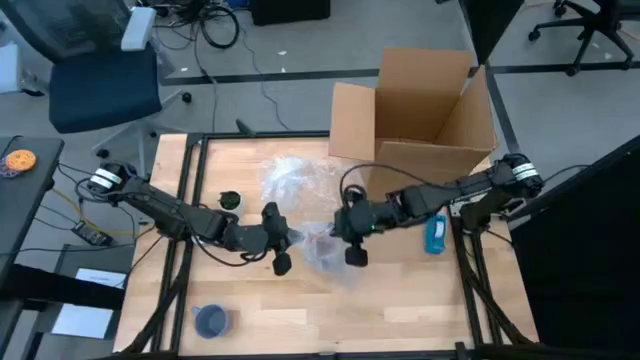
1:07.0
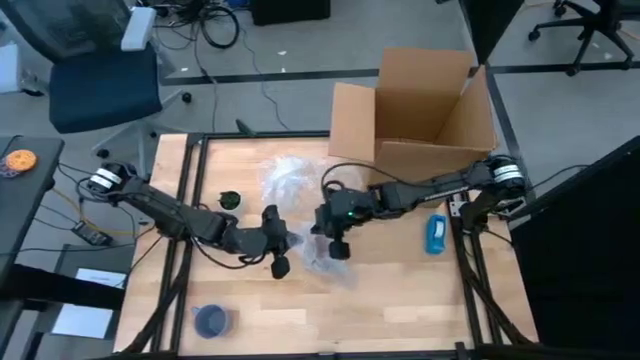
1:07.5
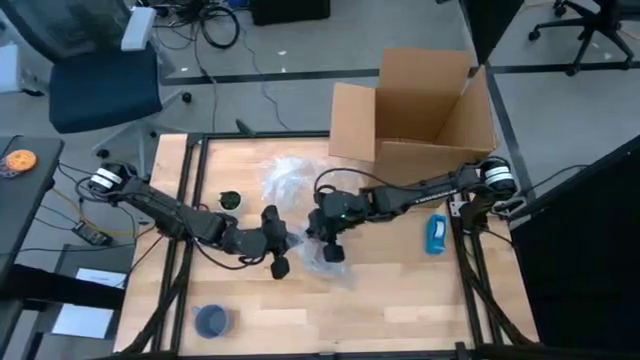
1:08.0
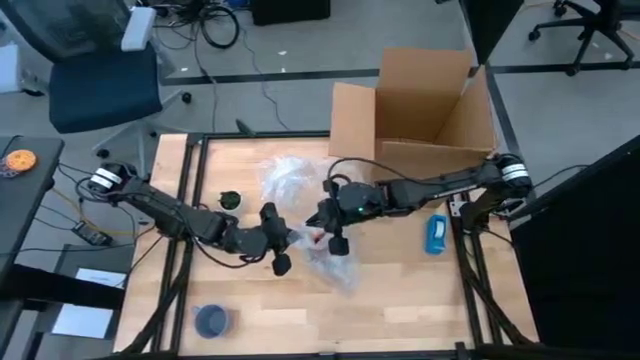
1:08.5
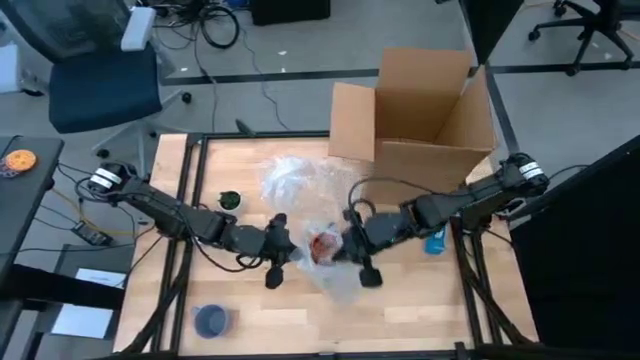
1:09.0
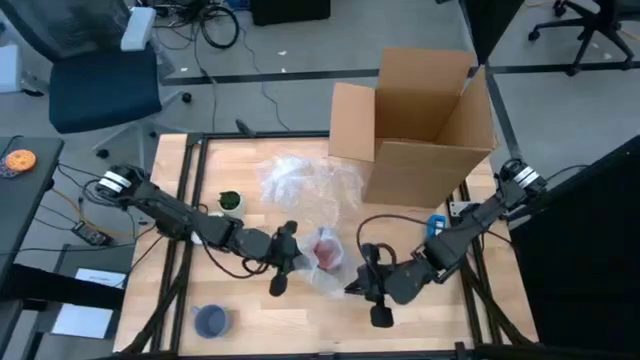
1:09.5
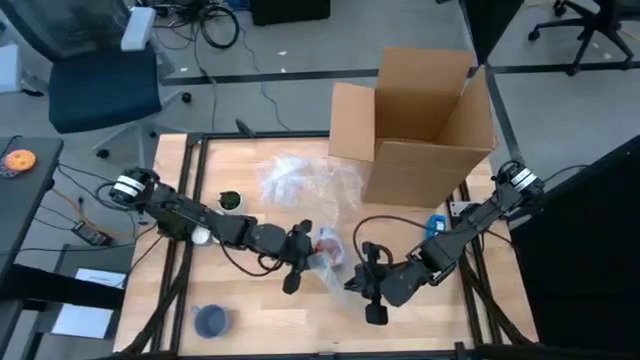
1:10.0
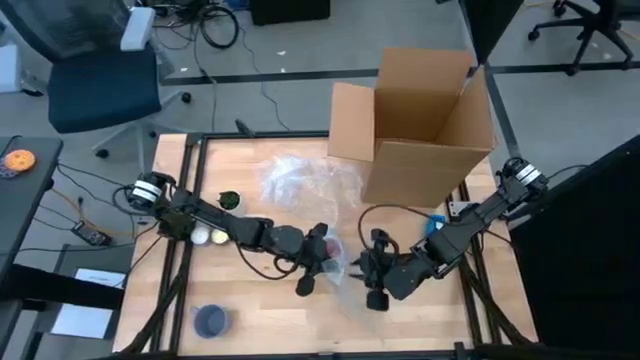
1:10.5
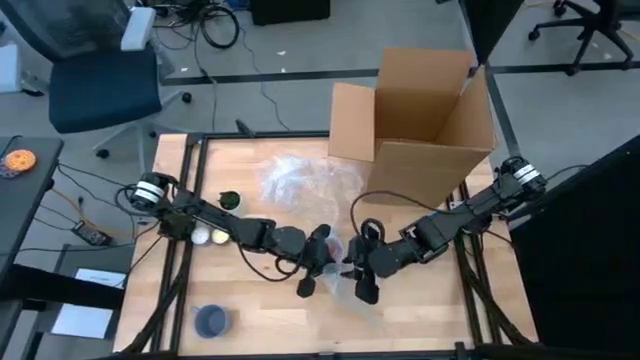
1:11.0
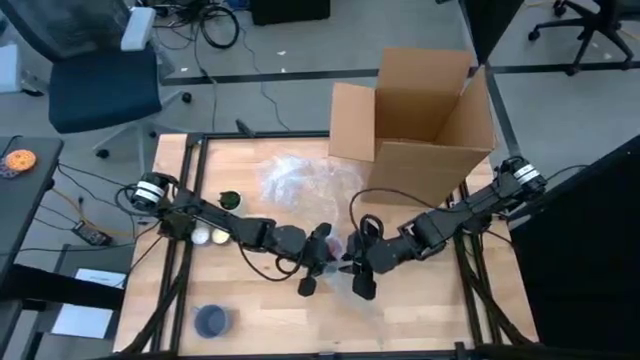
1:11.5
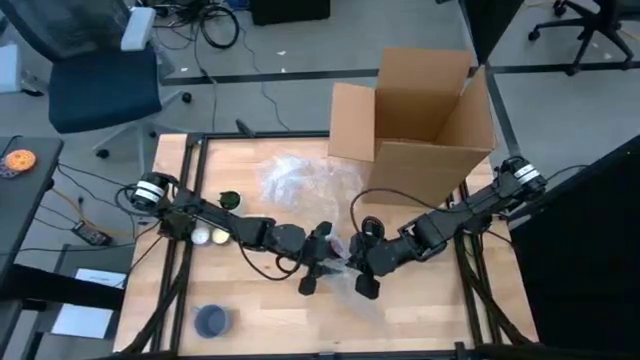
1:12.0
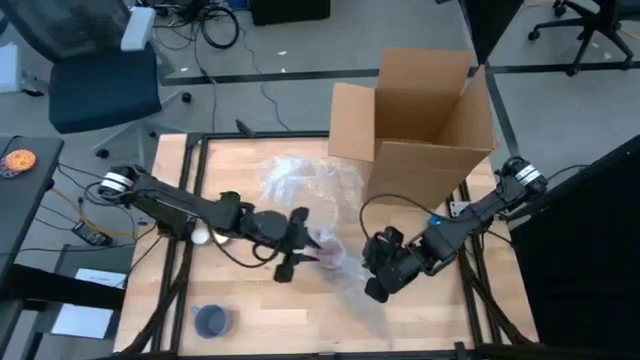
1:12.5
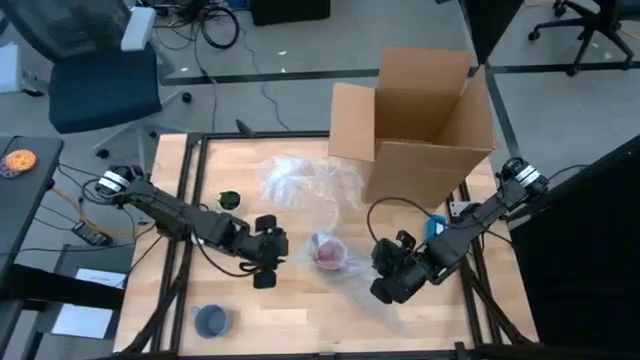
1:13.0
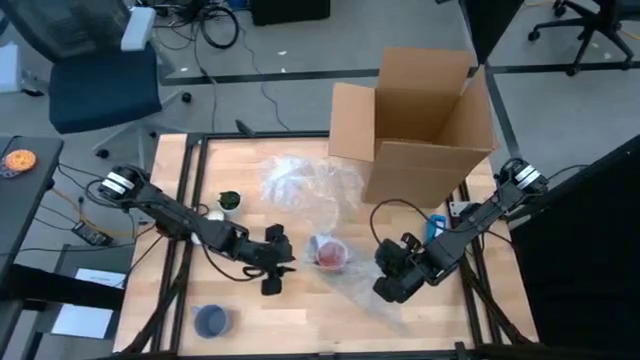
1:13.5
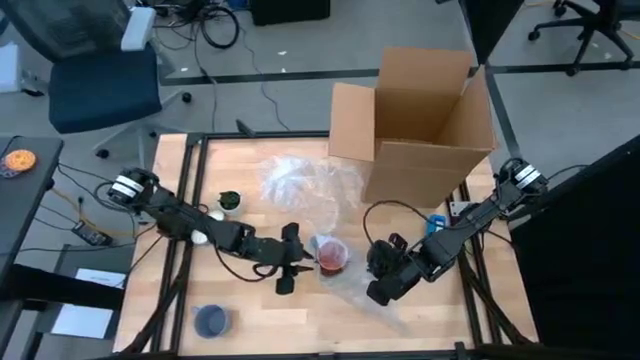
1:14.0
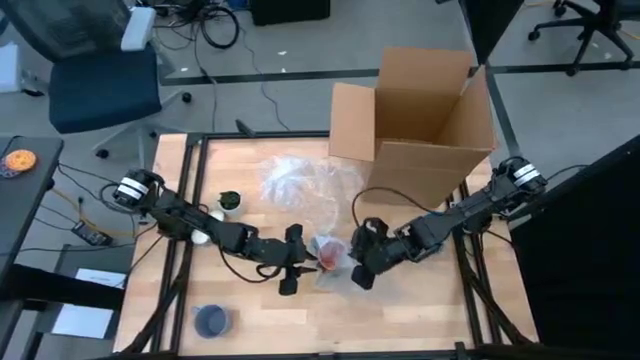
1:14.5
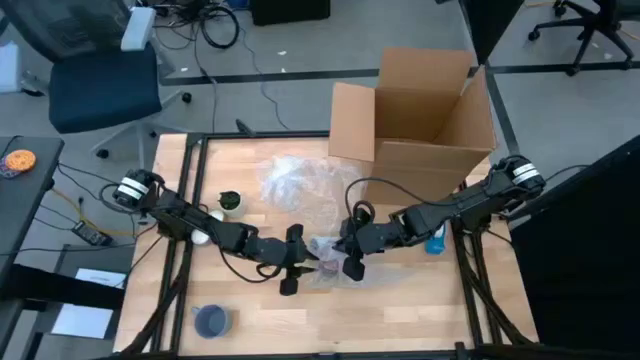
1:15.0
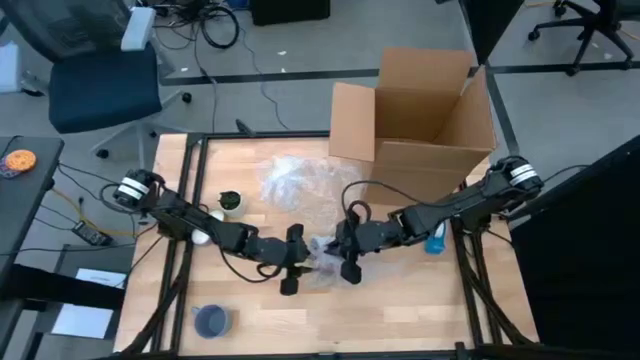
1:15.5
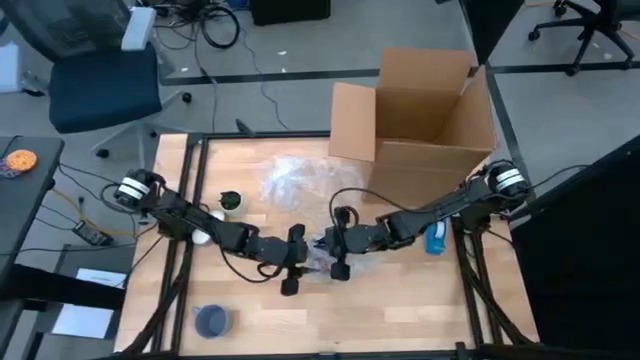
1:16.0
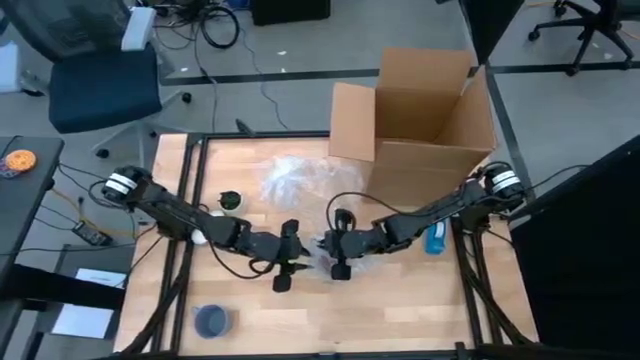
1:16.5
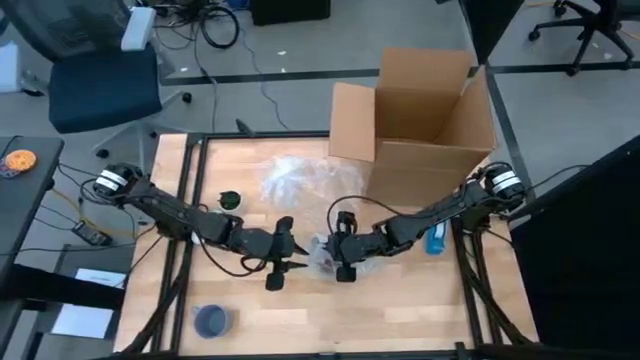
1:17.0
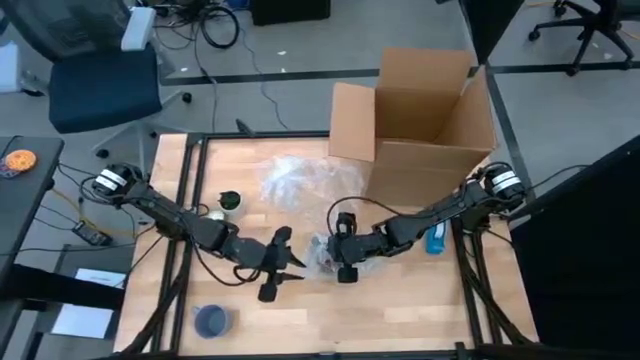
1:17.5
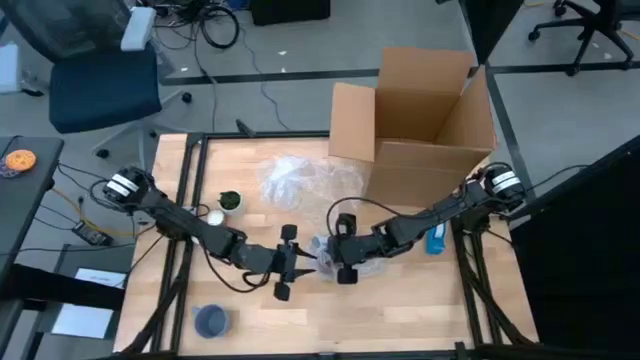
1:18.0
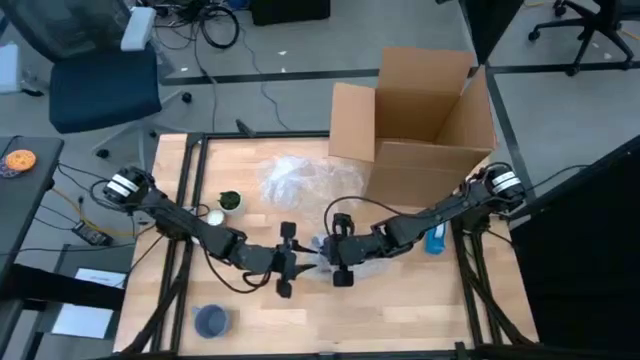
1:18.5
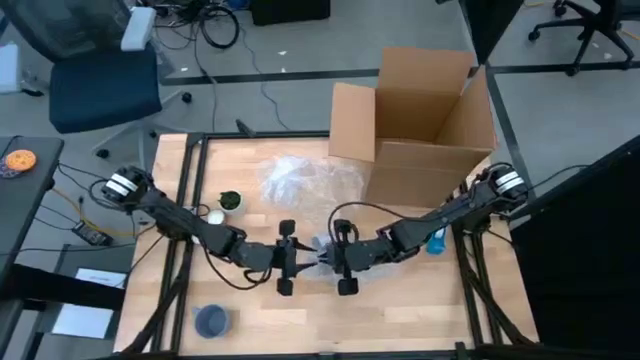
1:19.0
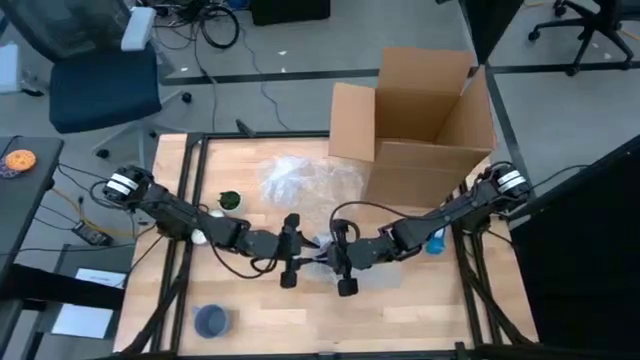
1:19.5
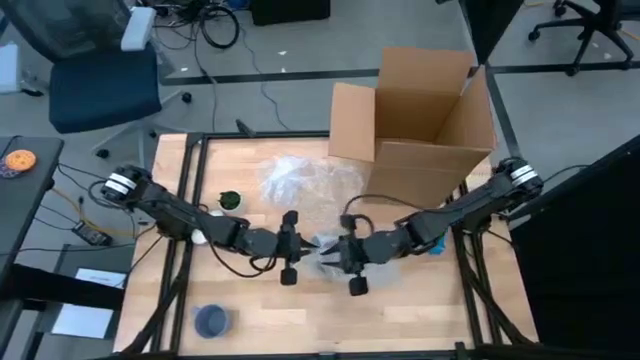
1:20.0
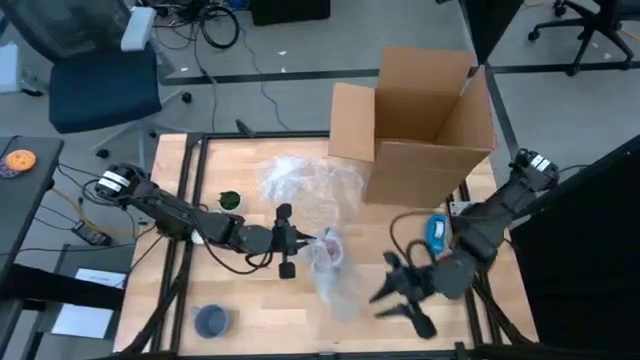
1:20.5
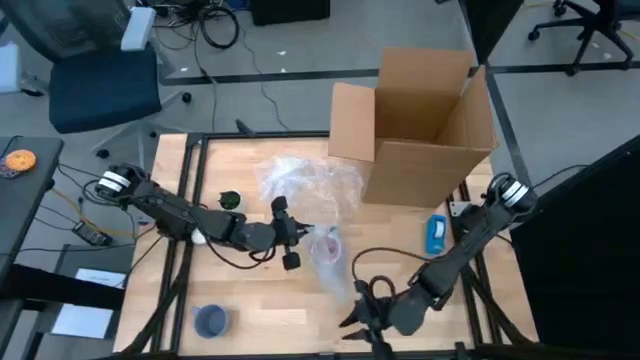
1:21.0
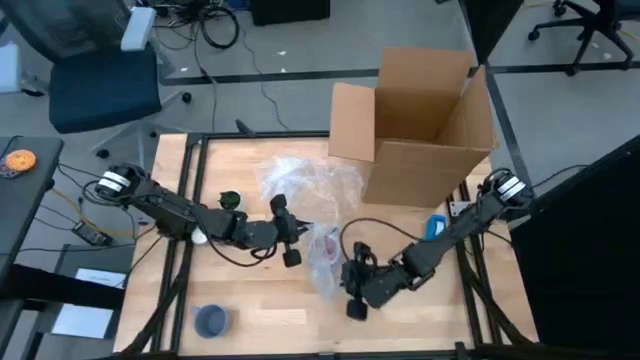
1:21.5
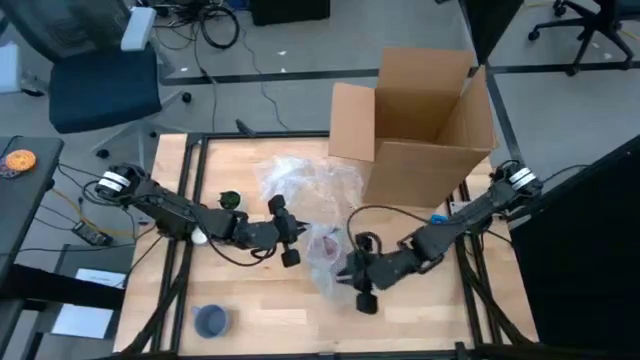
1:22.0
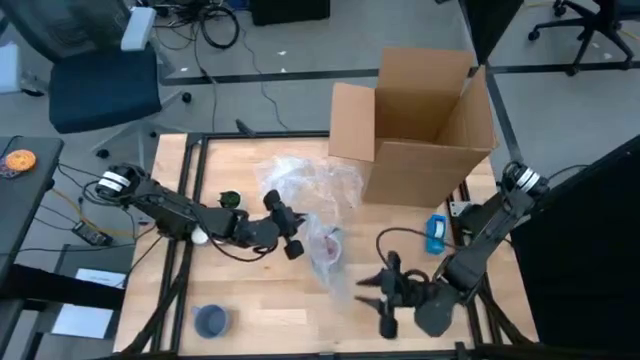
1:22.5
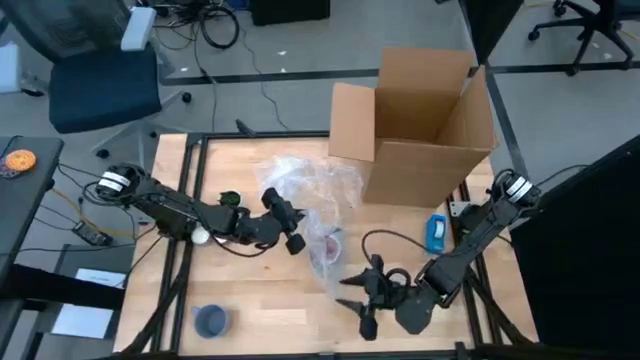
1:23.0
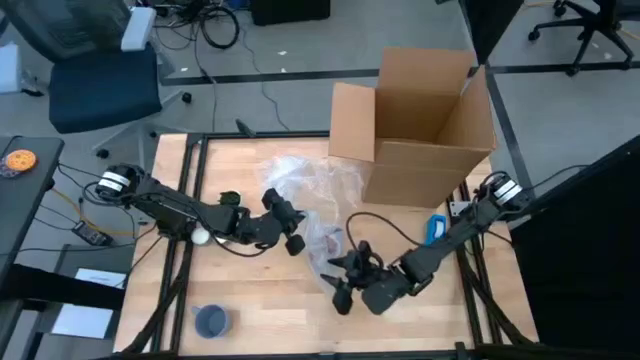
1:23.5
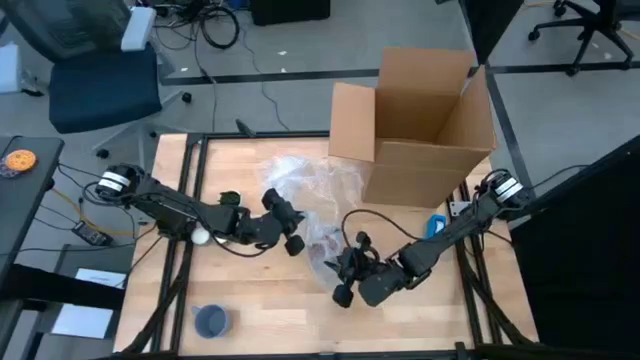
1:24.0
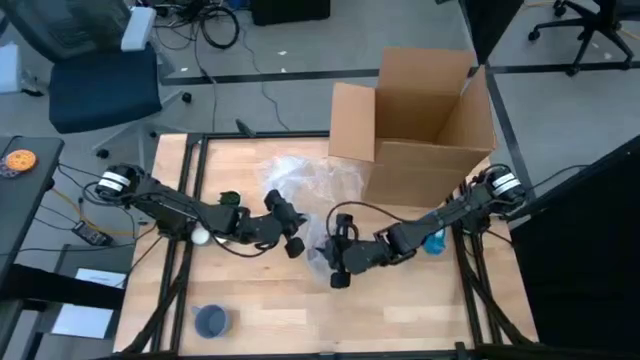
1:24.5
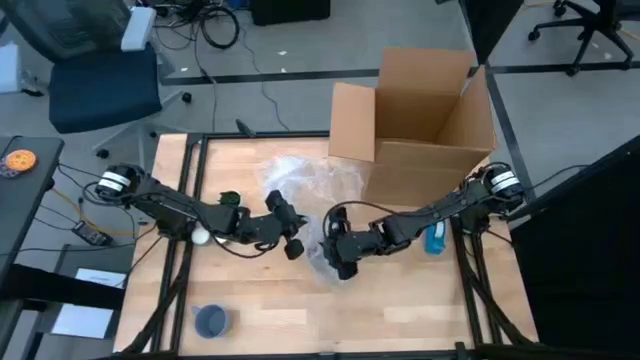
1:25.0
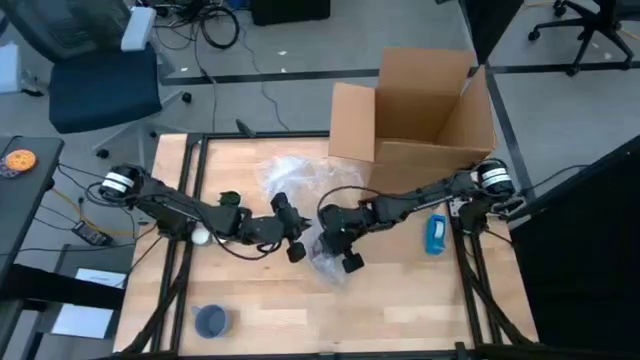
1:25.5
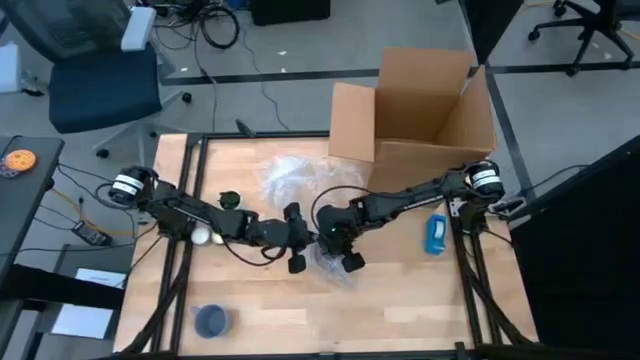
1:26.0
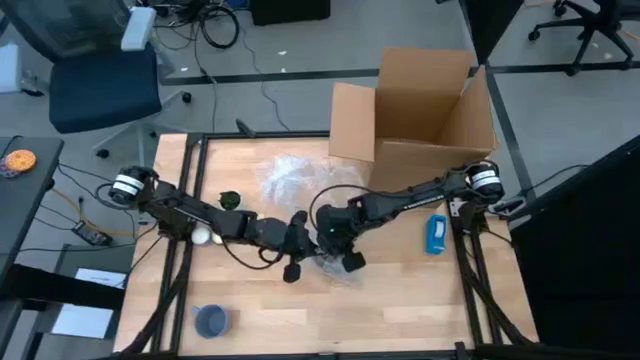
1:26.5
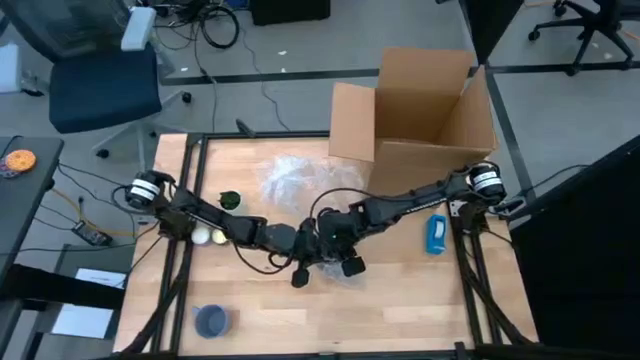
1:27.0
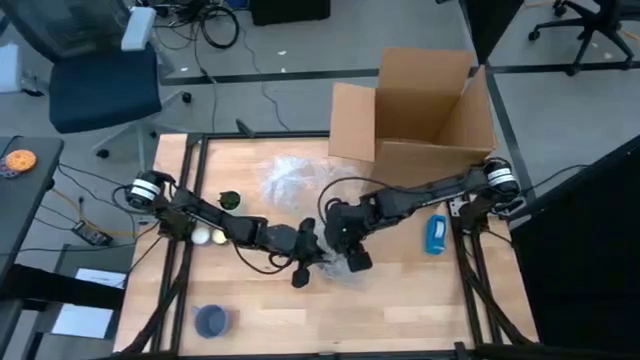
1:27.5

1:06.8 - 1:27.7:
Task: wrap mug
Wrap the black mug with bubble wrap
